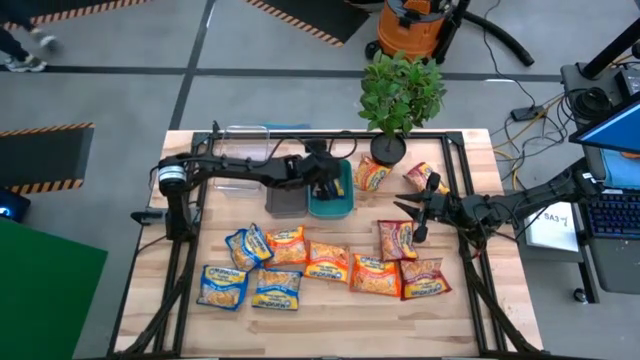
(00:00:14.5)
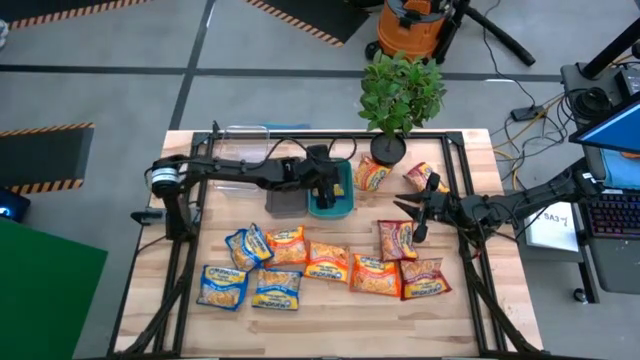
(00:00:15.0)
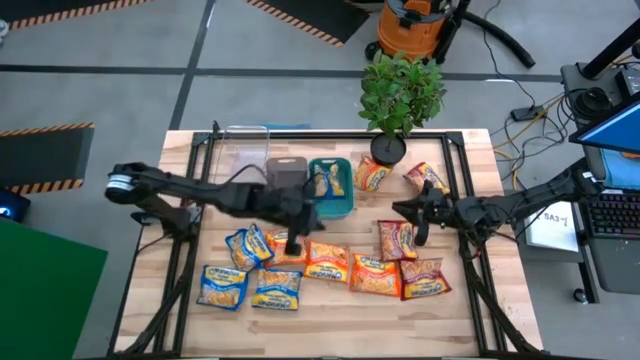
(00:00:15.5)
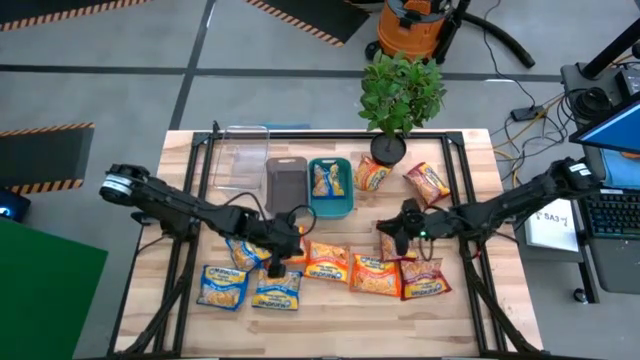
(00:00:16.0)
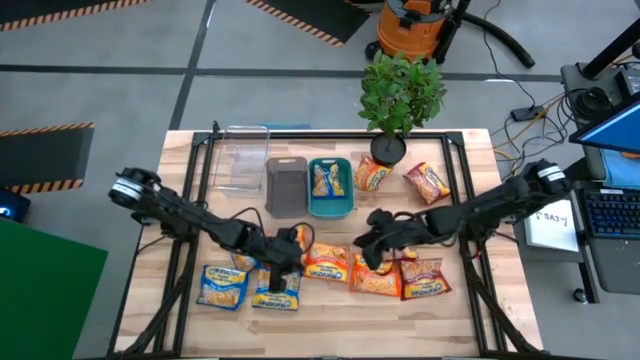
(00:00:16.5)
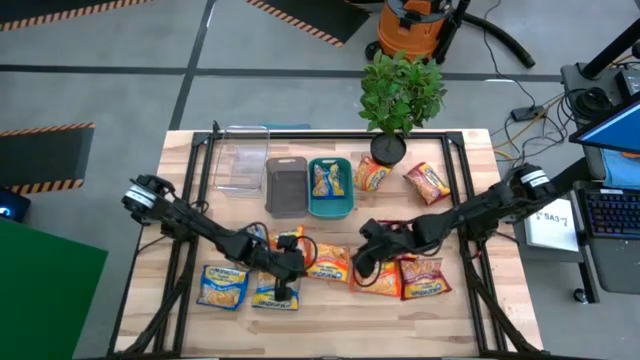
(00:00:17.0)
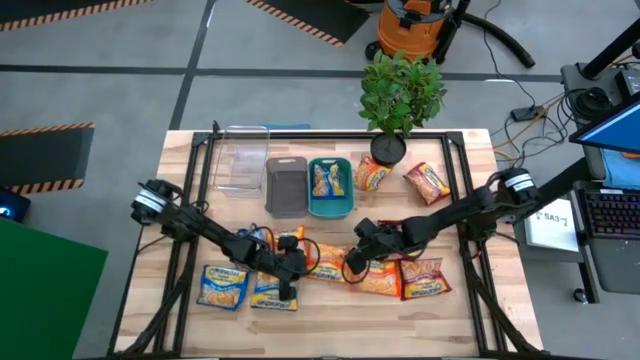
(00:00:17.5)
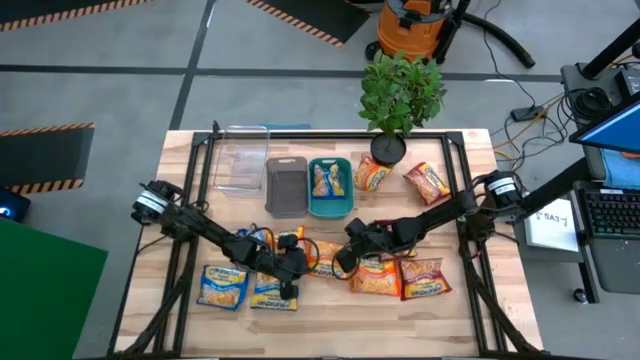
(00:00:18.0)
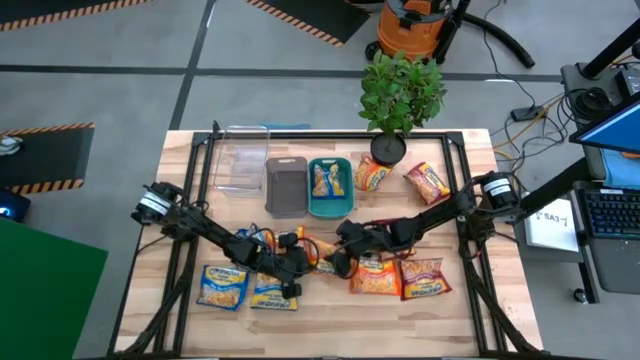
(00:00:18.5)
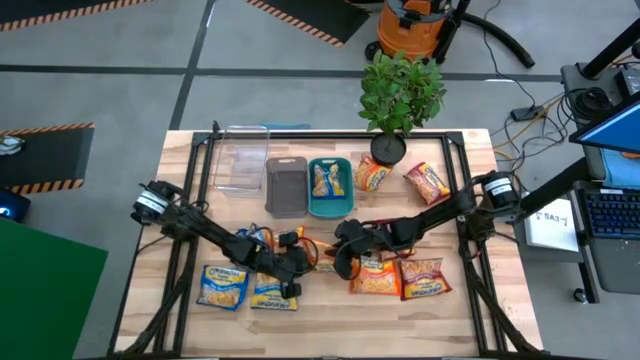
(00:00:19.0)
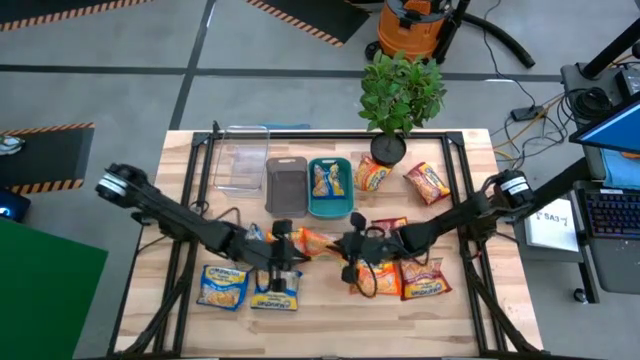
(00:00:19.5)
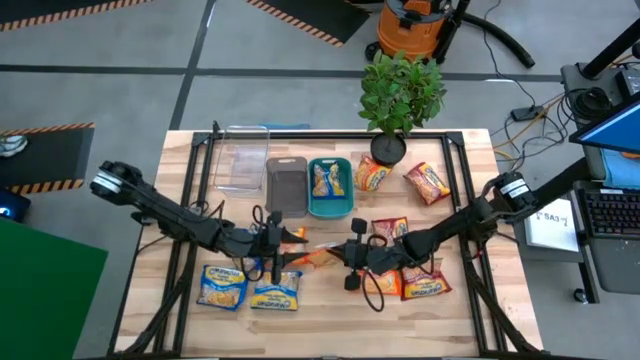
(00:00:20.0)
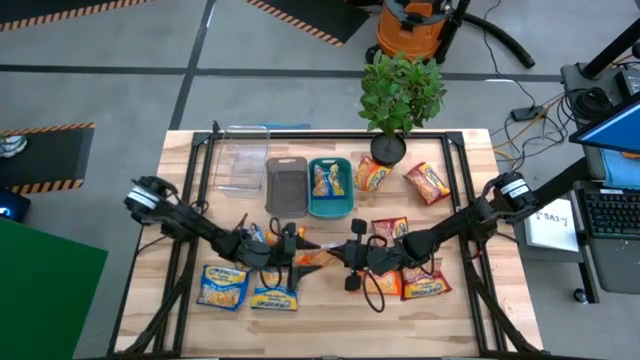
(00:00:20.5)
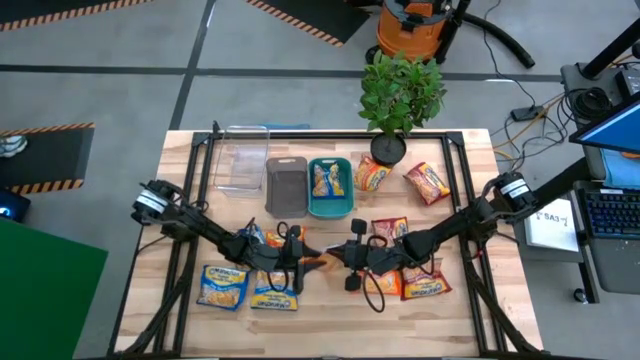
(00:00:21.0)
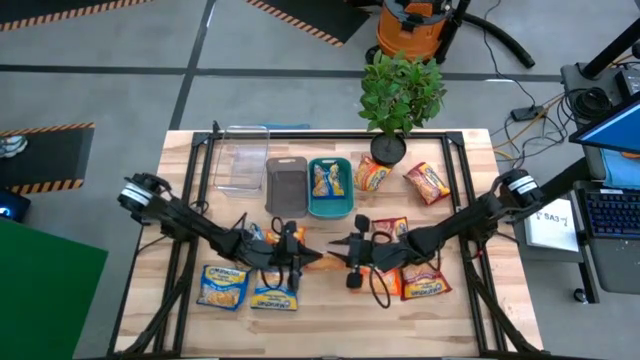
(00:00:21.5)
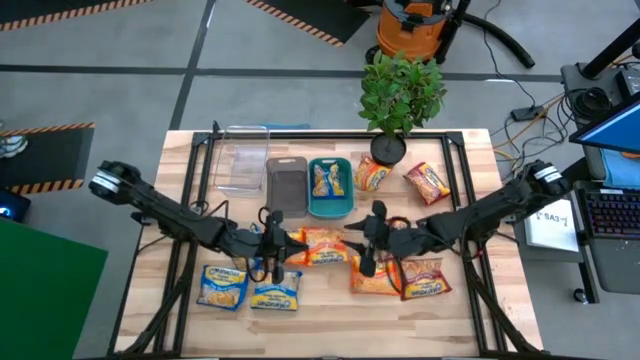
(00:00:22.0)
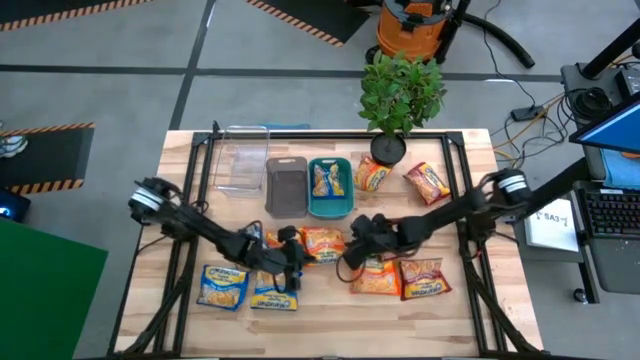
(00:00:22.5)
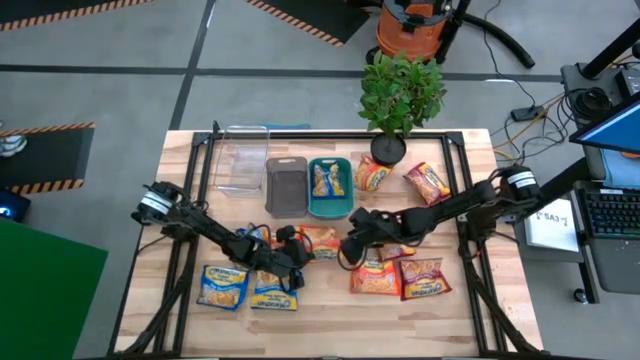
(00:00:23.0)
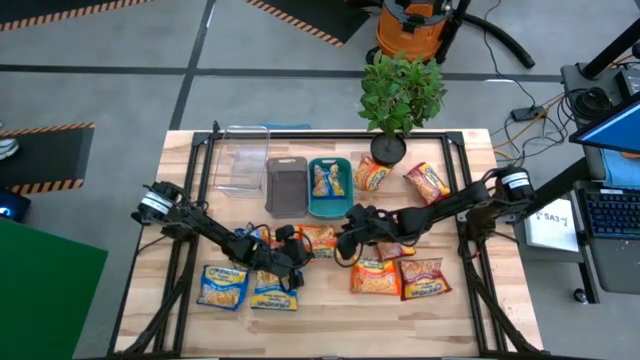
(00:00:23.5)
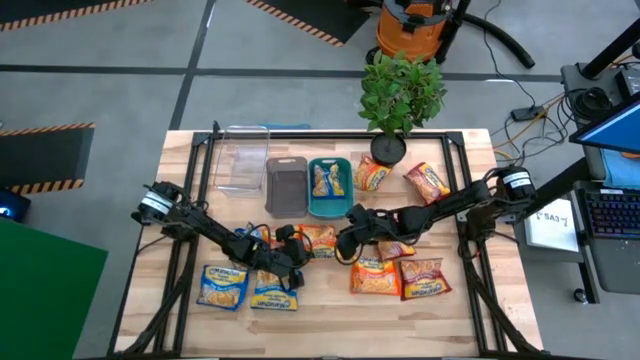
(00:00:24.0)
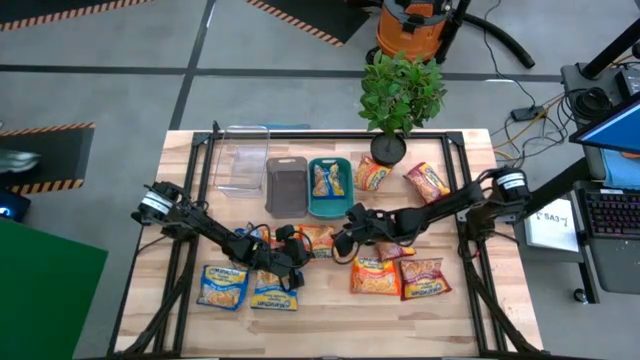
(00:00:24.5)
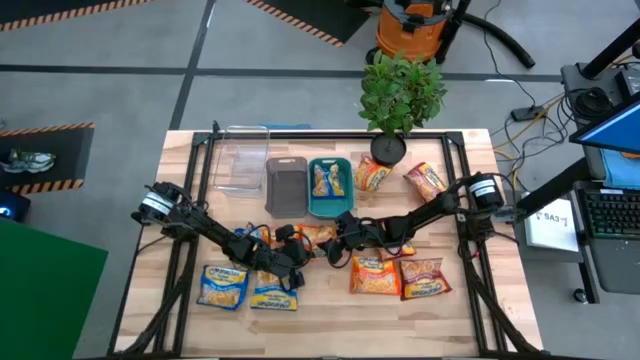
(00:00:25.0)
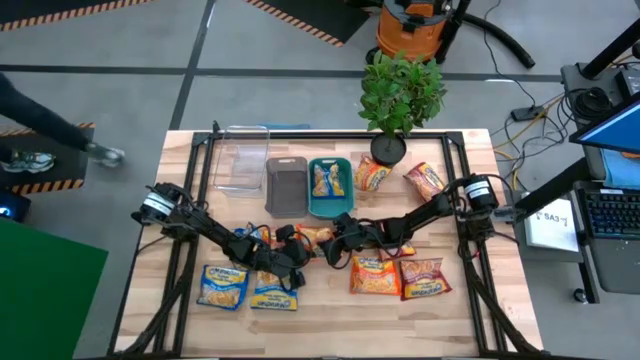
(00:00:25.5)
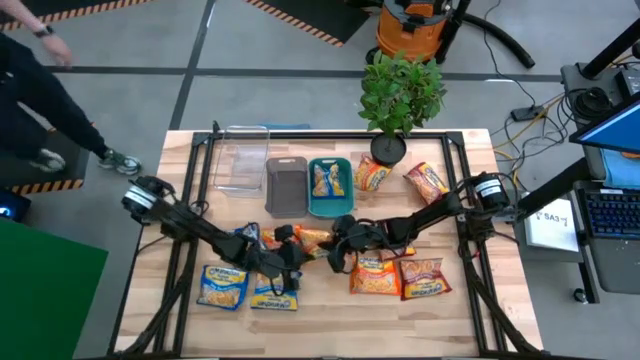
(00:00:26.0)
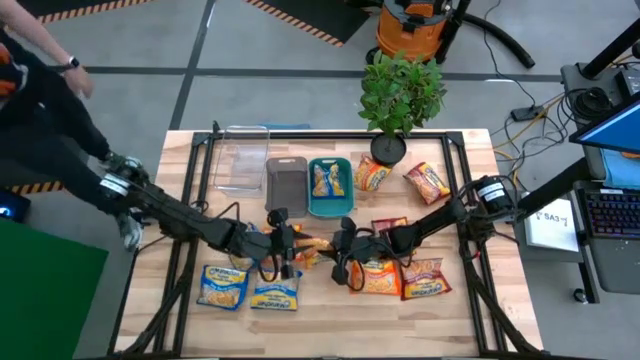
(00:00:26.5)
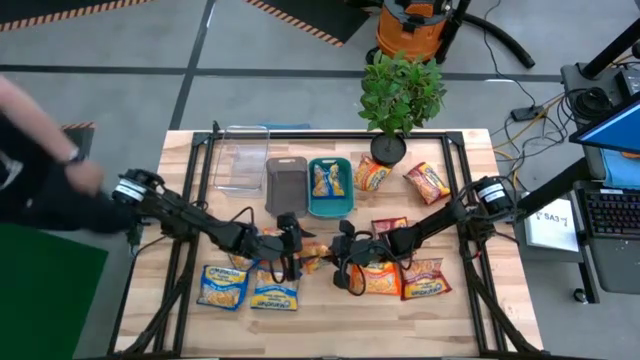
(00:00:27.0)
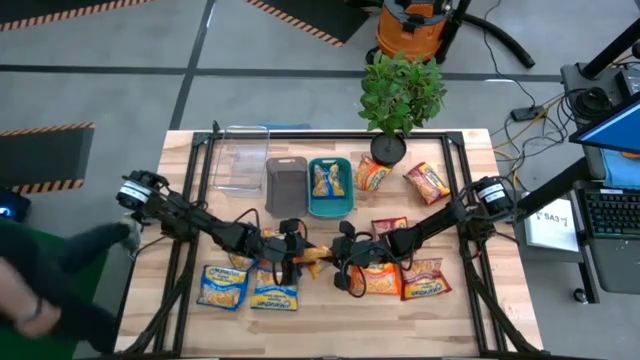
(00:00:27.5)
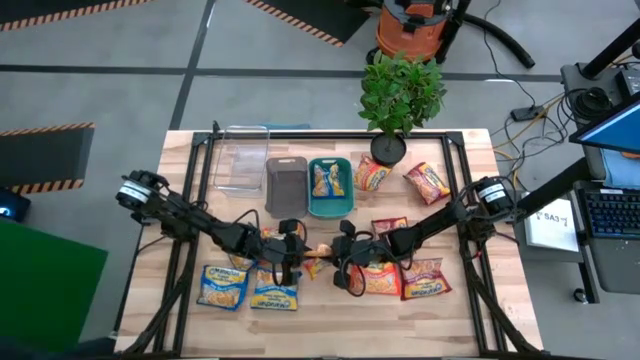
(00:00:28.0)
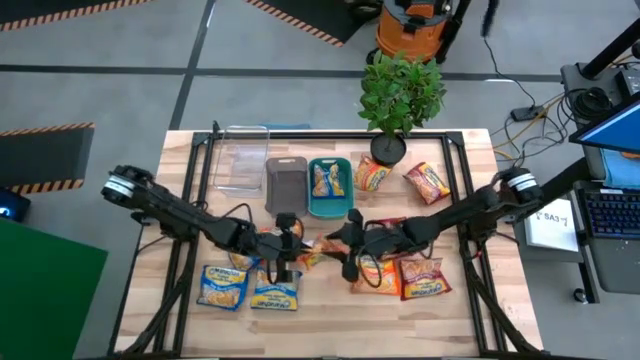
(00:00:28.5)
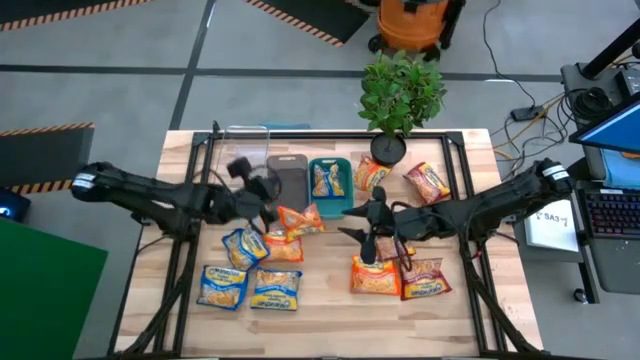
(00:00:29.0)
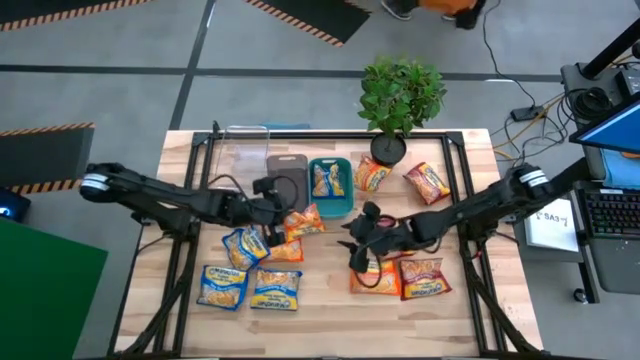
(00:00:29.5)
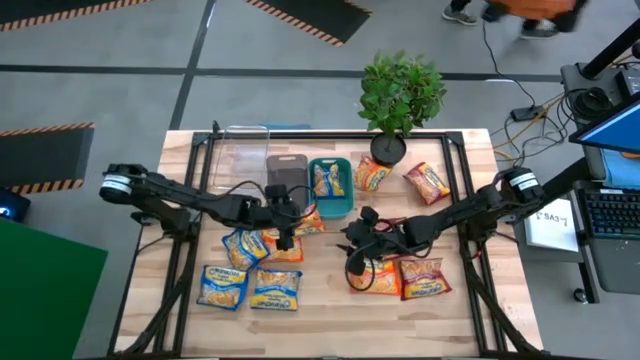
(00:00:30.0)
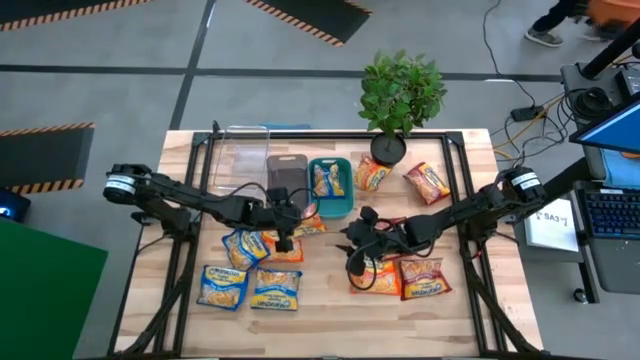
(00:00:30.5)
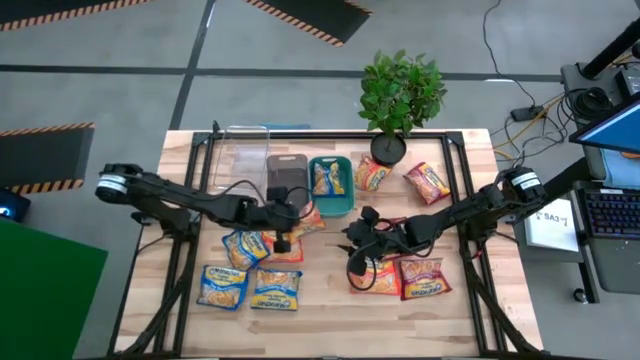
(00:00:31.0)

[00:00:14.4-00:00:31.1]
Task: Sort Maruchan noodles
Put the orange noodle pack into the black bin

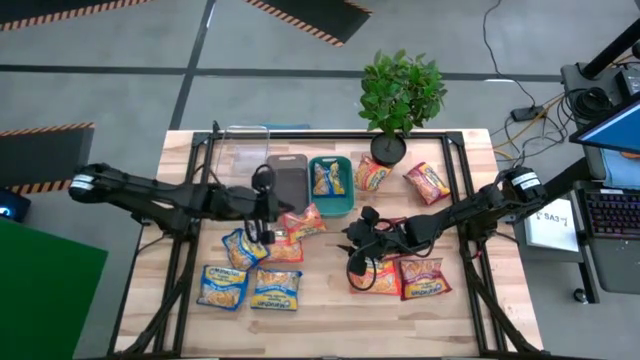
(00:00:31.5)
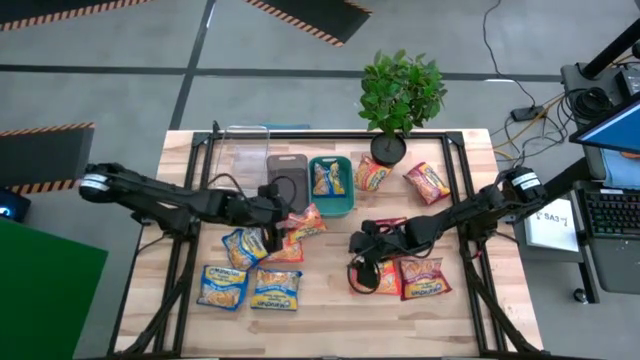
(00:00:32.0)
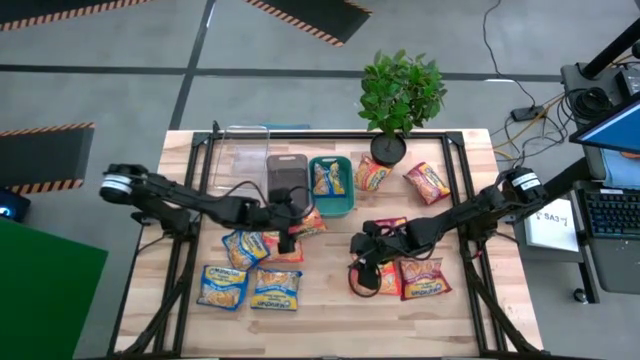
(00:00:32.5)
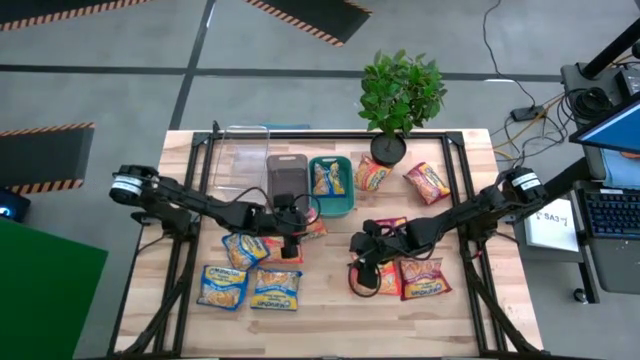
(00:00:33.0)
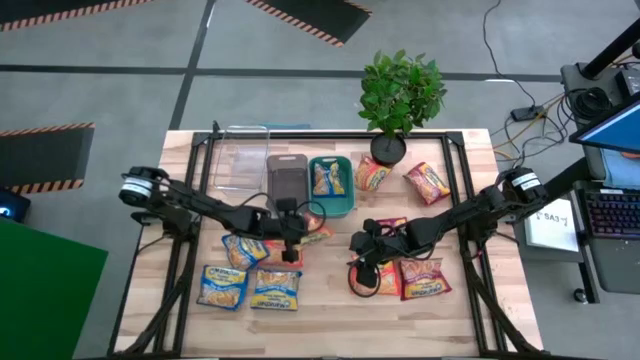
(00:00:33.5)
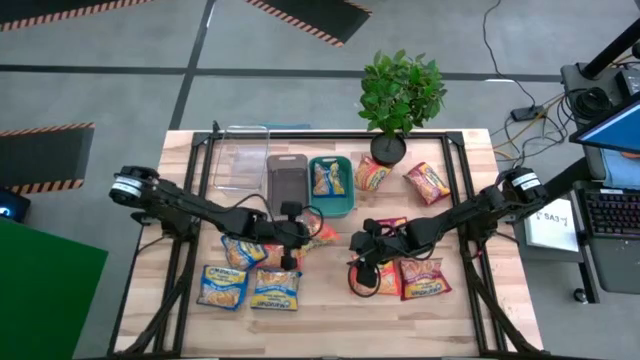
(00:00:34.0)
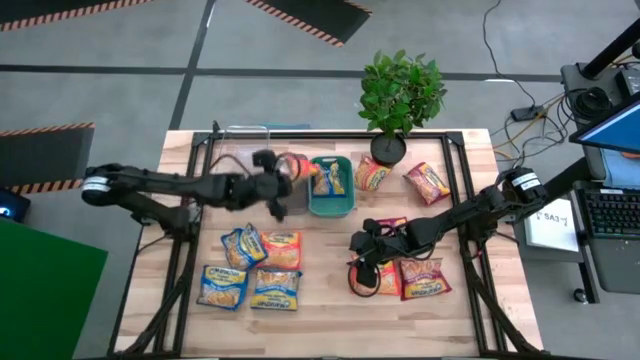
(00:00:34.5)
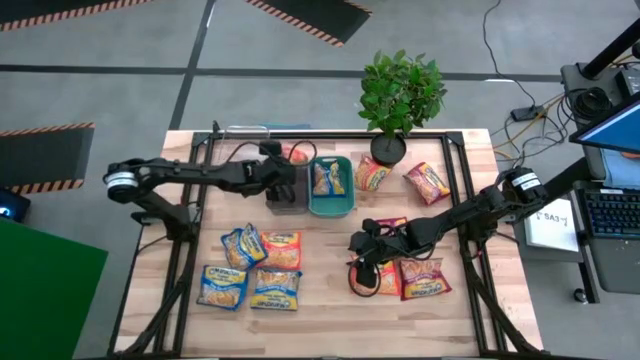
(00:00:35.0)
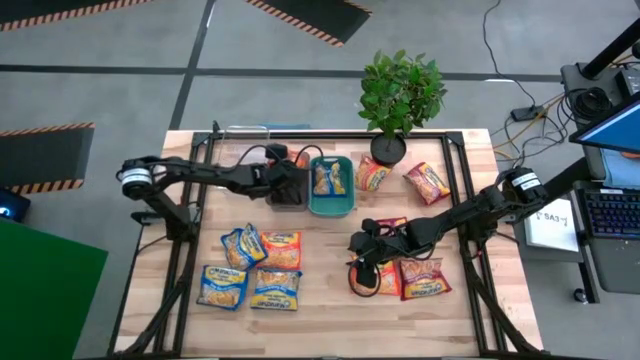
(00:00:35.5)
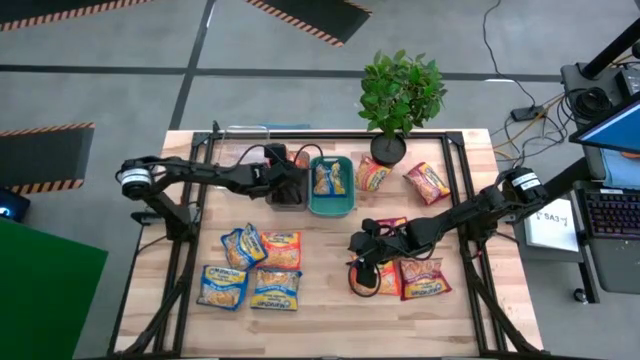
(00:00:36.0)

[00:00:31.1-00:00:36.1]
Put the orange noodle pack into the black bin
